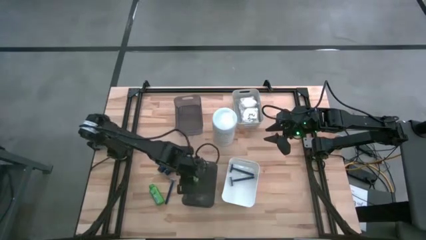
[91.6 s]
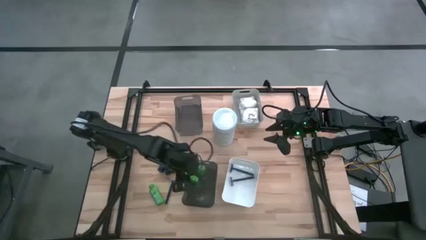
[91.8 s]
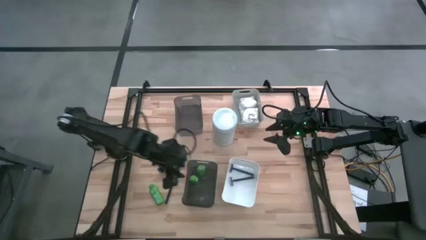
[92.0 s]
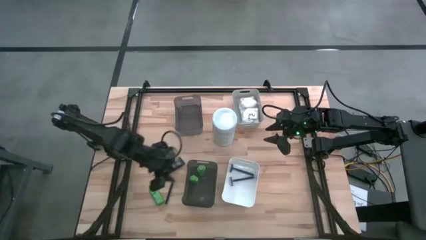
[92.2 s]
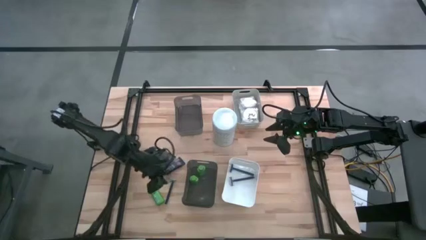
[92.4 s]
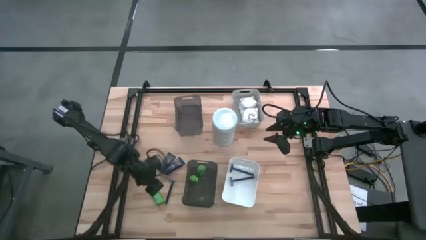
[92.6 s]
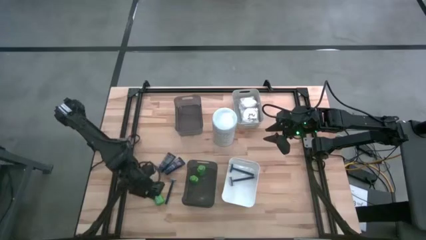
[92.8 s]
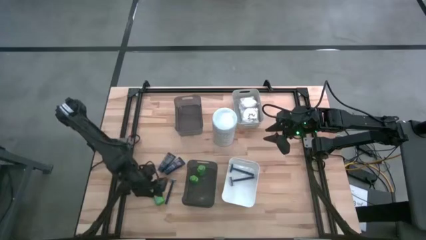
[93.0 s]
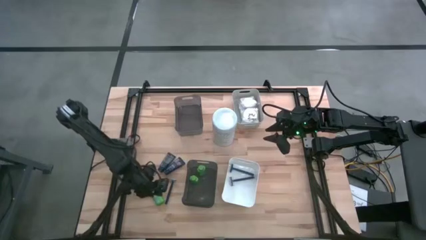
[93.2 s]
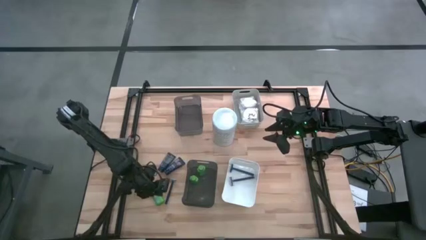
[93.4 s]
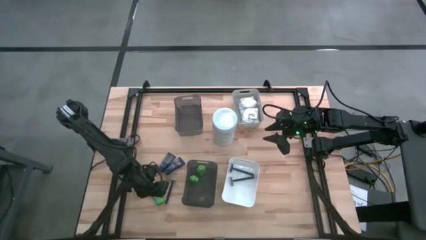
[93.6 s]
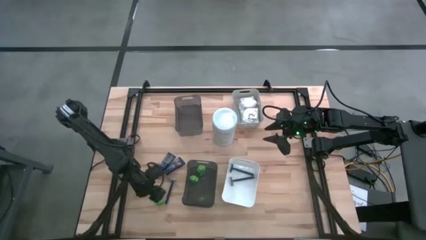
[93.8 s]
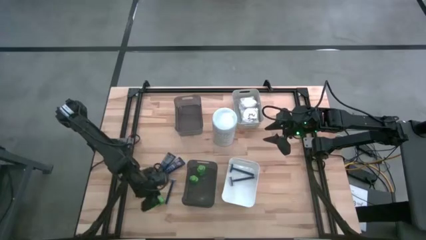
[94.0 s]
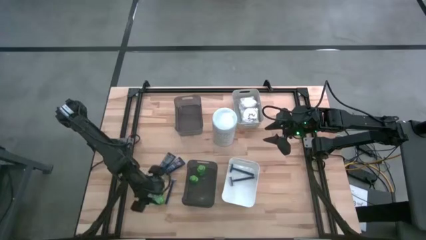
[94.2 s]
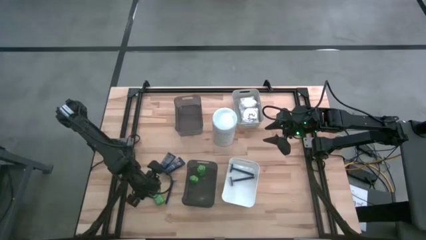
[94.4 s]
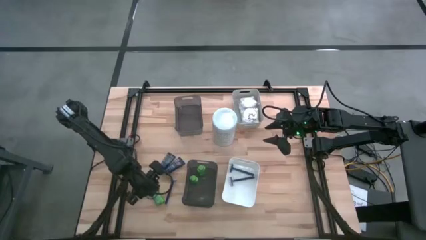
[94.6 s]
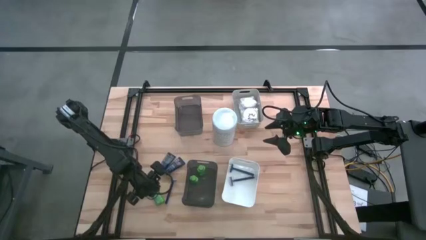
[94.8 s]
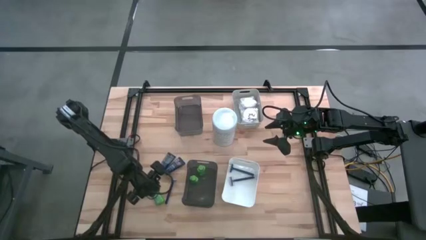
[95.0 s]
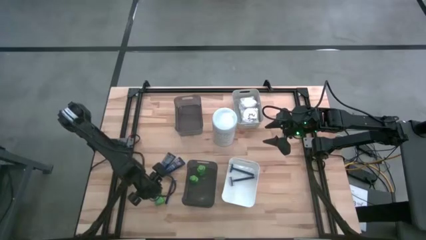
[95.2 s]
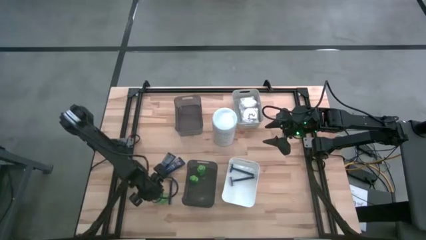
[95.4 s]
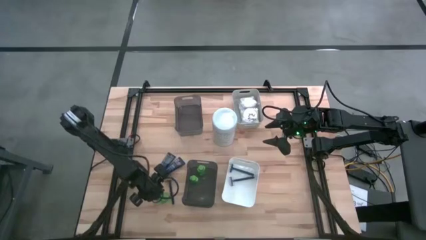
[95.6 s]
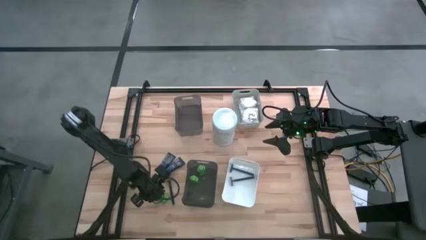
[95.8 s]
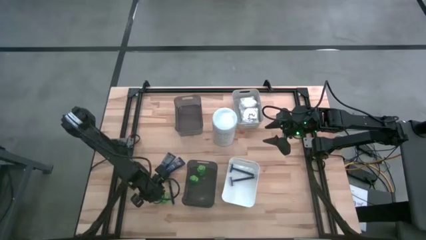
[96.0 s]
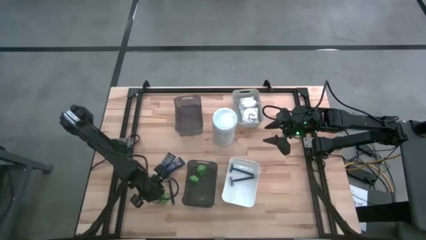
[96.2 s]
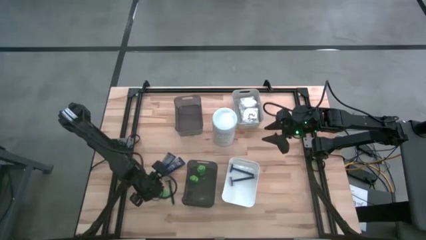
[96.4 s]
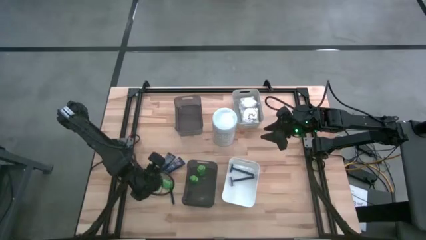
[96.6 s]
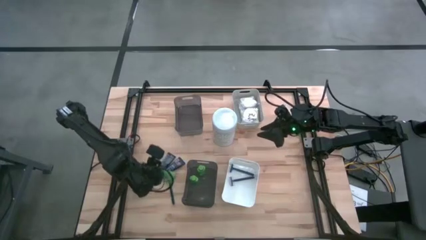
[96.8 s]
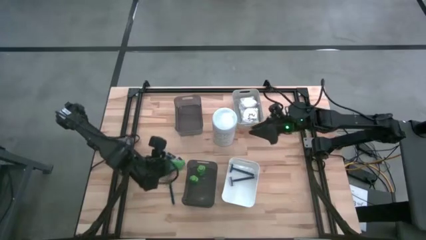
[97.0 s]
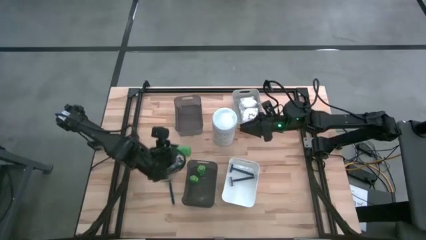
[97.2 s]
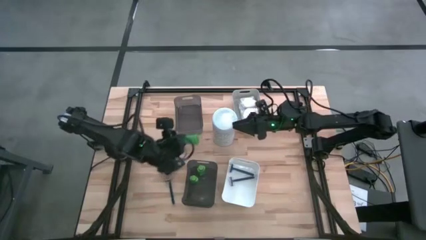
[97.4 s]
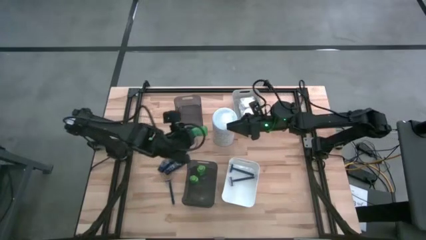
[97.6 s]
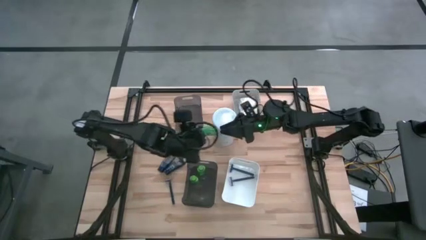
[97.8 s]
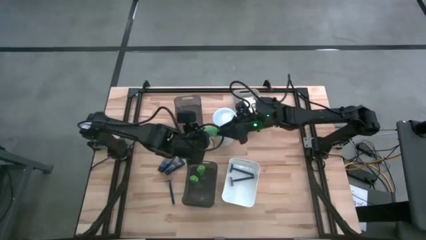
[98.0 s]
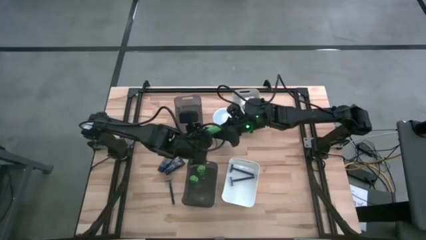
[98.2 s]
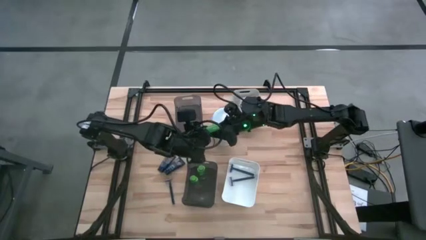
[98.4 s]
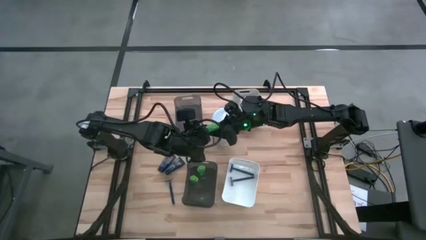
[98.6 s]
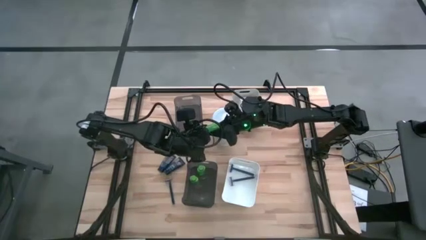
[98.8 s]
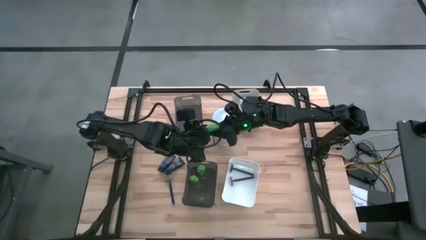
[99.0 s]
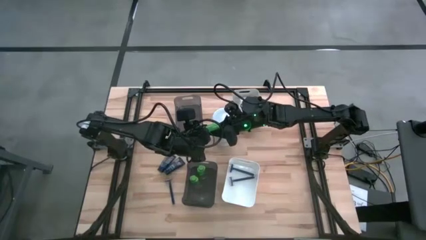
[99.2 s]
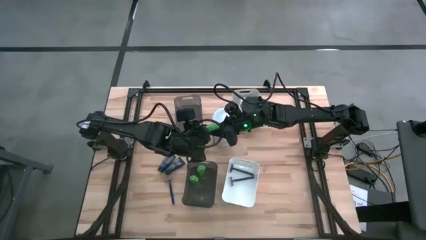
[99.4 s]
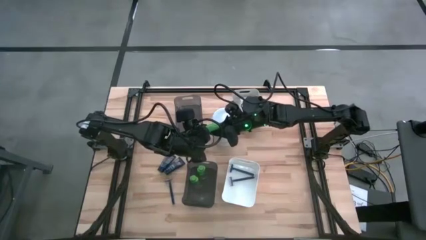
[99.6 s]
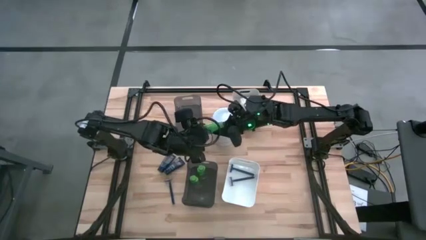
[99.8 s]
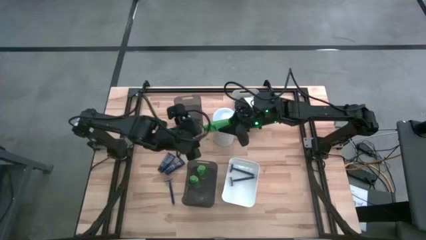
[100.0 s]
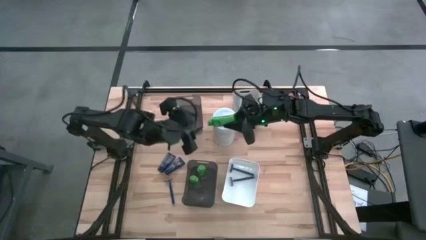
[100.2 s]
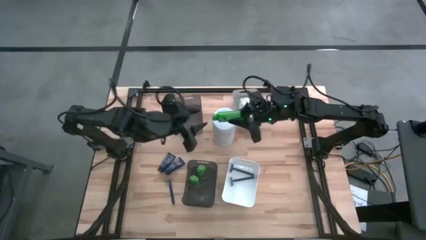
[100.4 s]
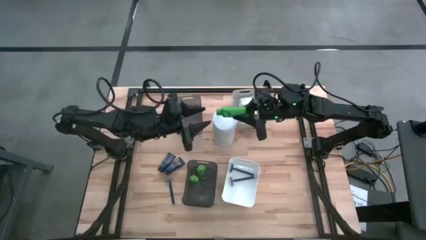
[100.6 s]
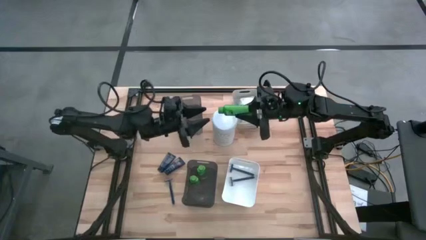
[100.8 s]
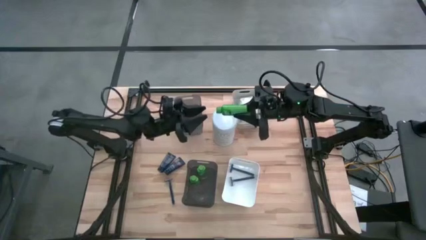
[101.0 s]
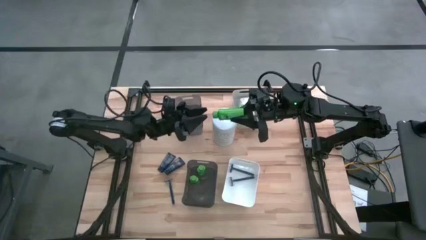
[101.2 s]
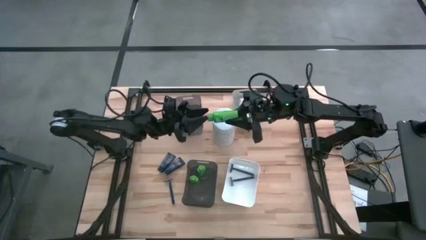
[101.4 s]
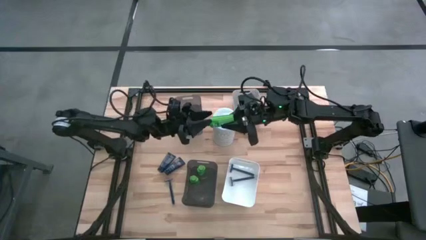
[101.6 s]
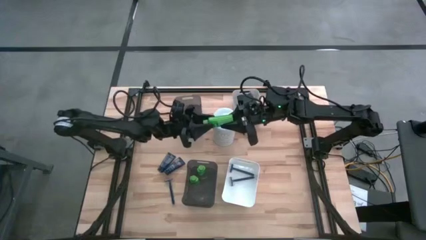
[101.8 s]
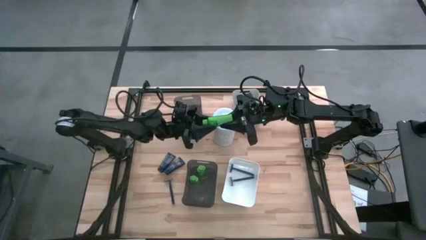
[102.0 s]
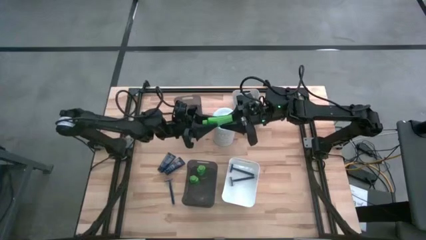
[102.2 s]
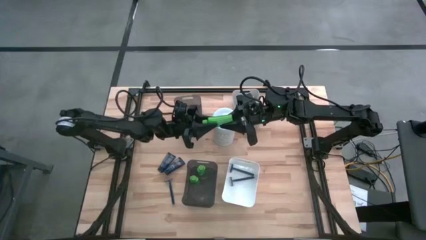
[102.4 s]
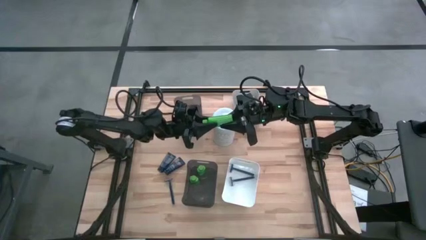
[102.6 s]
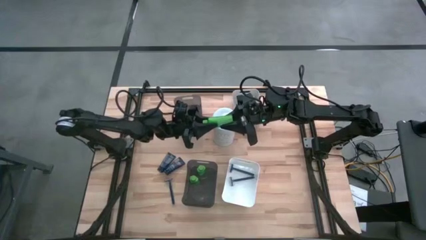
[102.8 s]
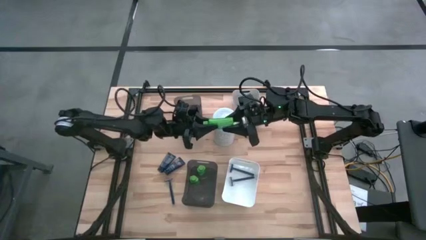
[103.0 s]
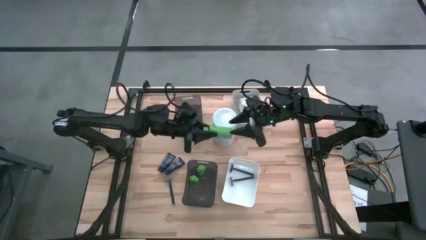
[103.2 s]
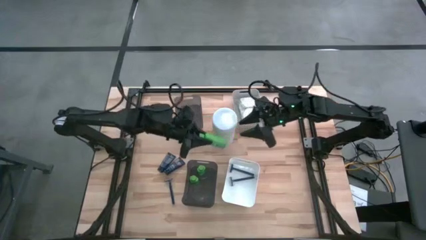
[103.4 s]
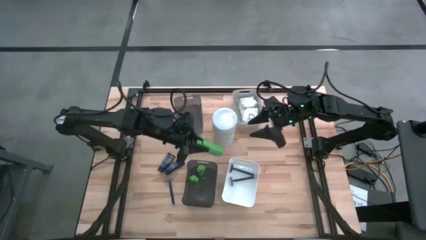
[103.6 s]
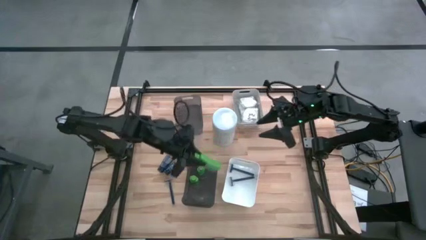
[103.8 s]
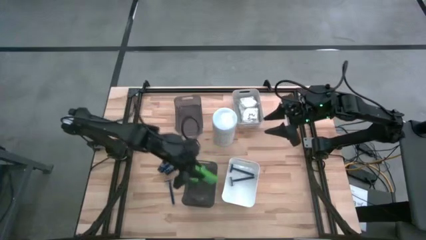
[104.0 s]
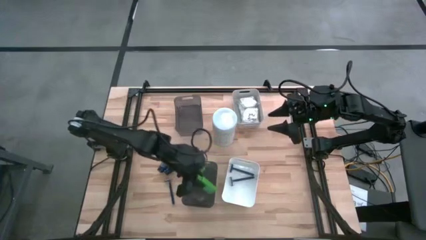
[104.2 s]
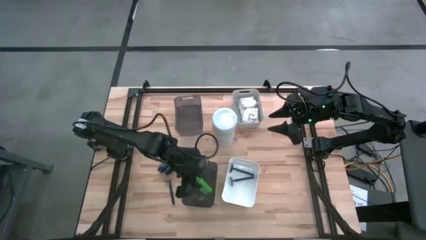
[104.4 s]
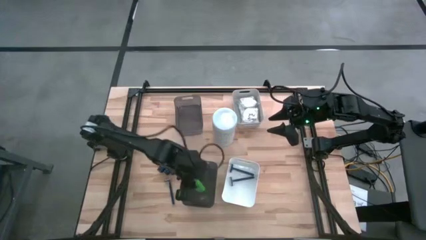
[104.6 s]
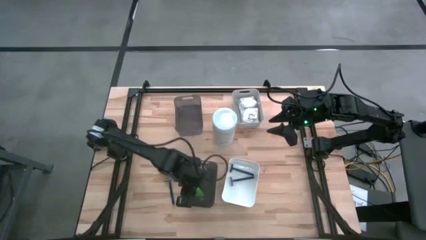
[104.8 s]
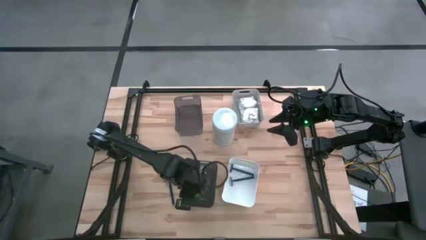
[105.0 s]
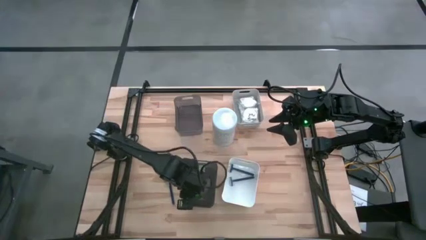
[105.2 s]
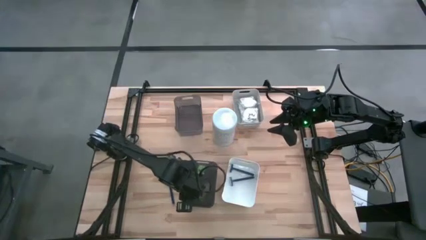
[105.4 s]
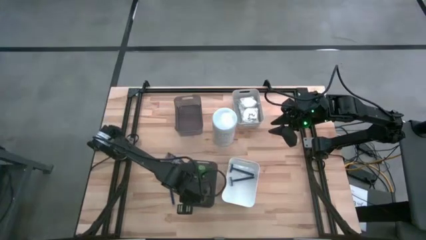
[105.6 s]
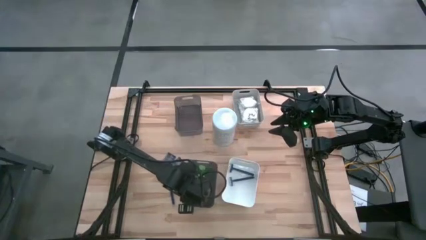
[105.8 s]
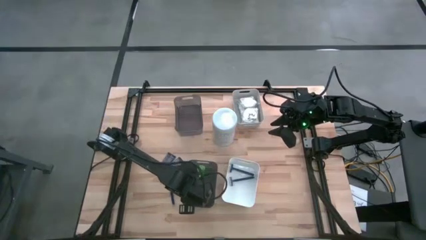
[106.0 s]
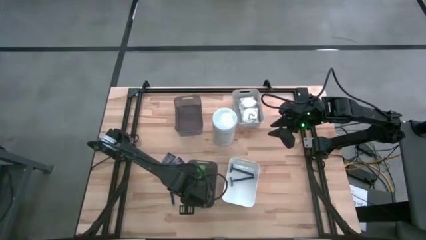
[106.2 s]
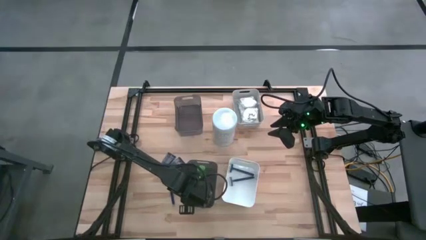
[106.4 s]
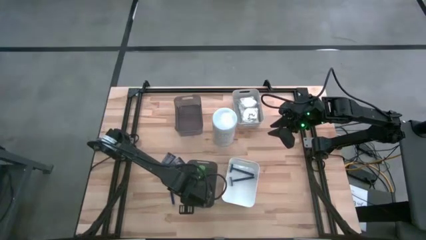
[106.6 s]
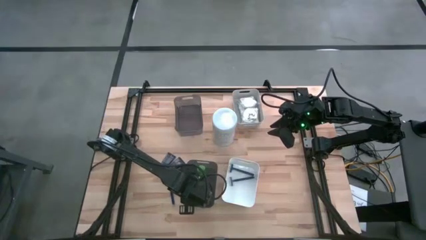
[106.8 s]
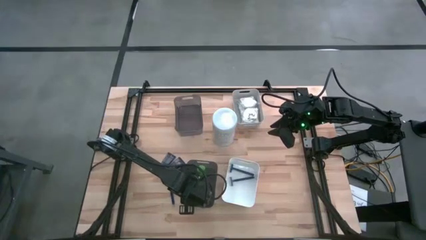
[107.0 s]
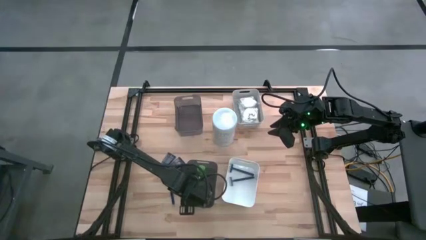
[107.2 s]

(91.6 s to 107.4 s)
Task: Pick & Place Travel size toiletries
Put the green shampoo bottle into the bottom black bin

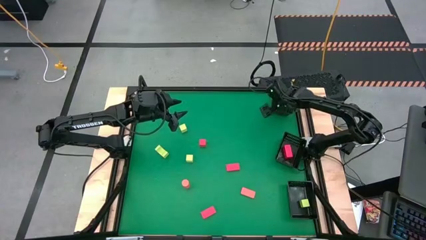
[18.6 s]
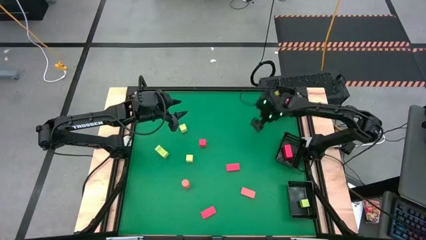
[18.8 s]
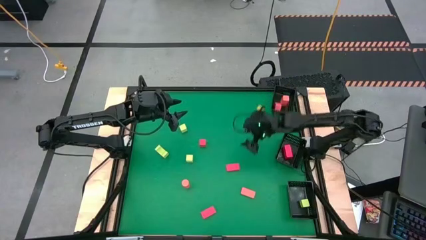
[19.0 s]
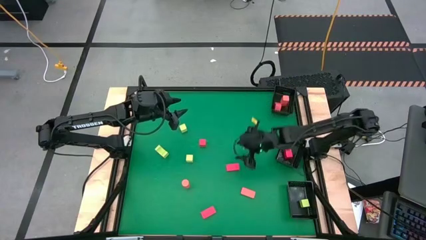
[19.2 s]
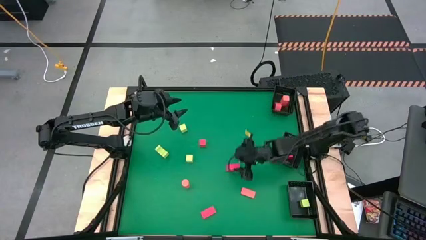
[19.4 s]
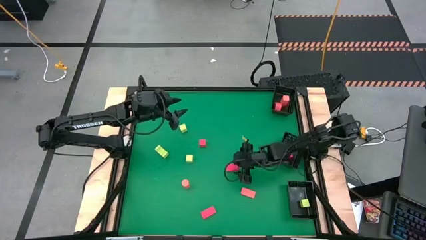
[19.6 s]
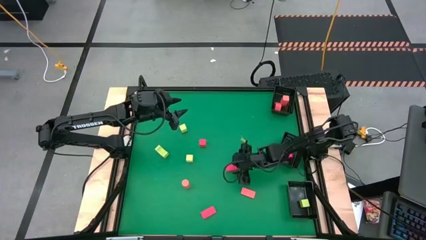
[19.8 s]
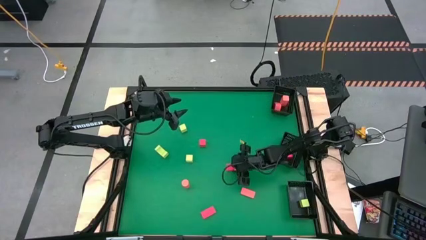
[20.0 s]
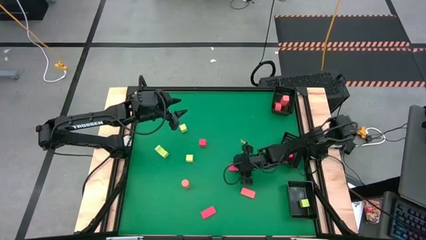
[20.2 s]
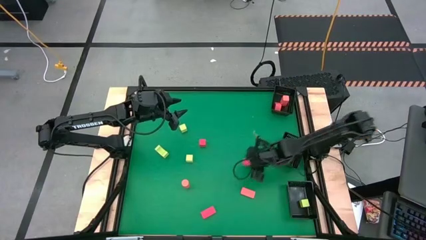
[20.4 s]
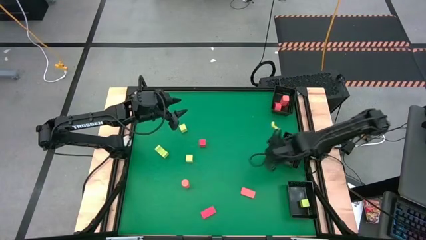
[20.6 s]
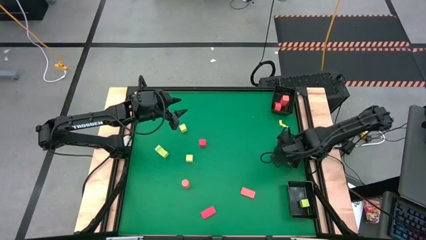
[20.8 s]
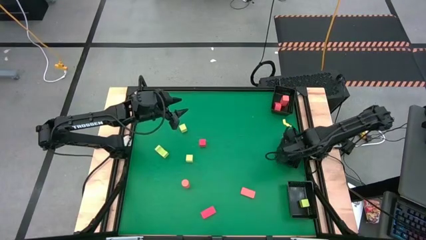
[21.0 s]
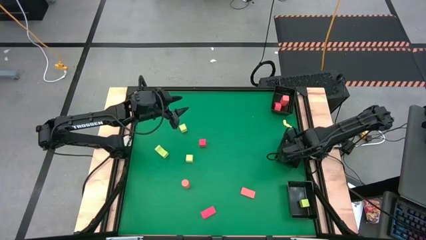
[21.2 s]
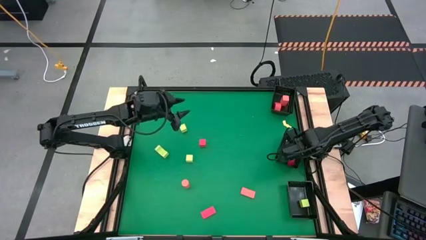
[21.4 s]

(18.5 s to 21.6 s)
Task: Sort & place blocks by color
Put the right red block into the middle right black bin
